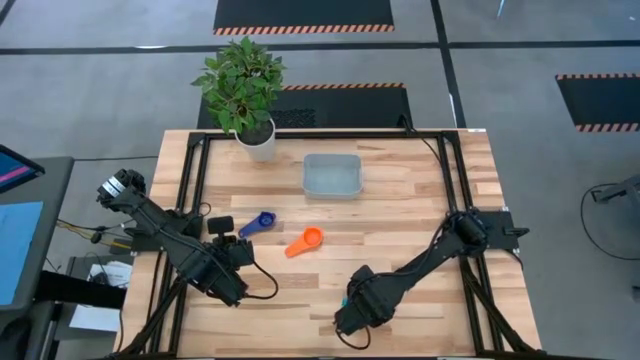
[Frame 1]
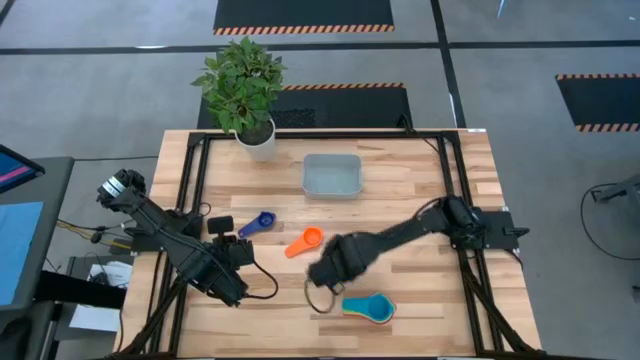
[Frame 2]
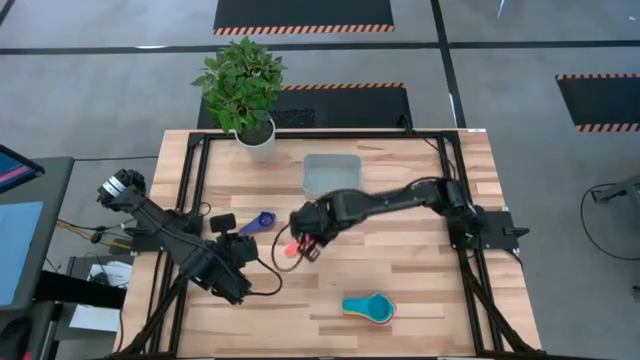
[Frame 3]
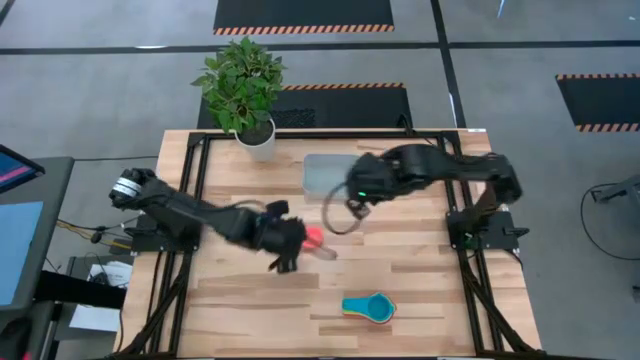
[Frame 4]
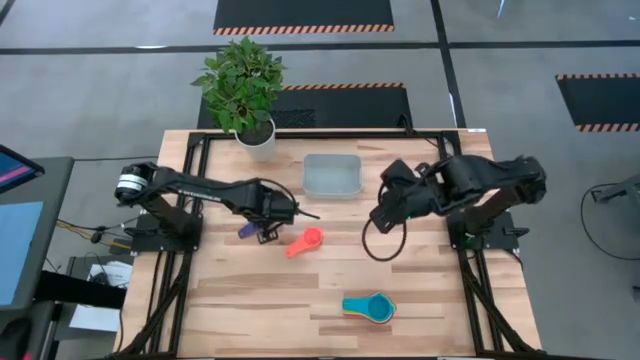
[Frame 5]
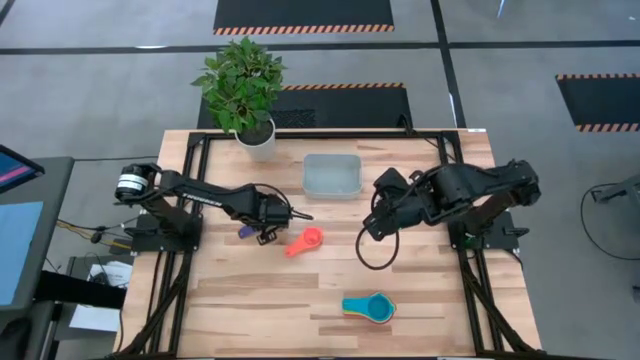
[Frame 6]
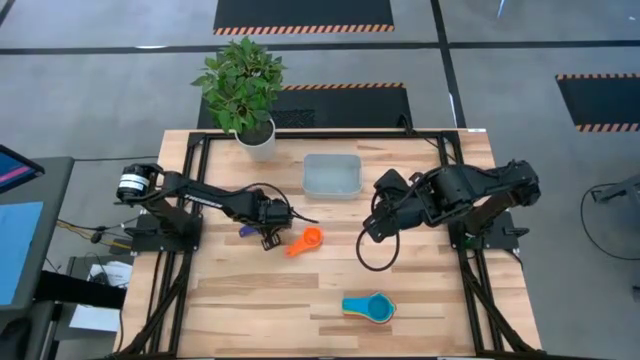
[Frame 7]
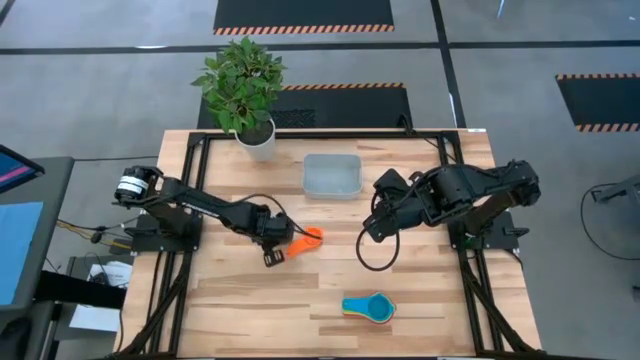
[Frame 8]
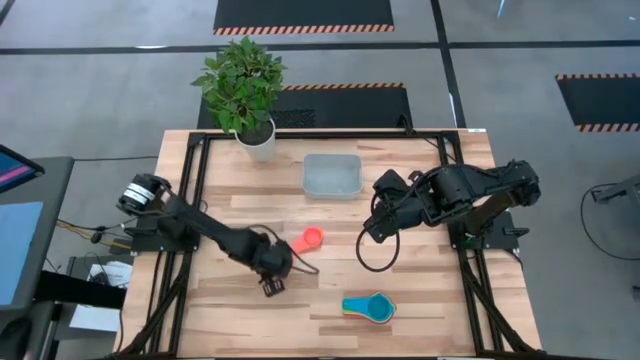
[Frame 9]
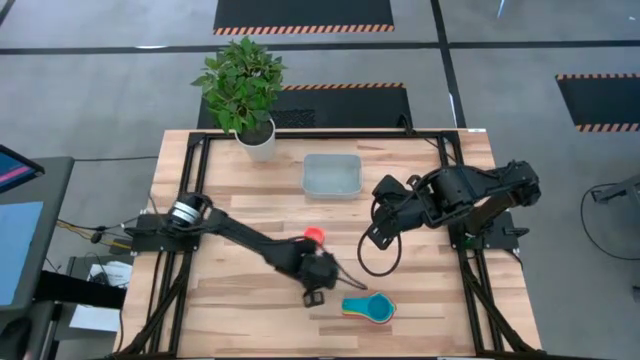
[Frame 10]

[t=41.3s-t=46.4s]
Task: Nest measuring cups in basket
Move the dark blue measuring cup to the center of the table

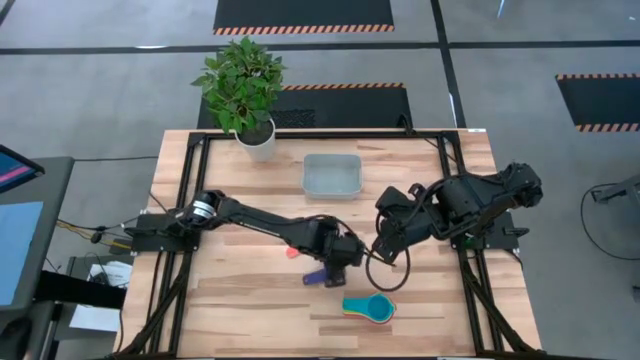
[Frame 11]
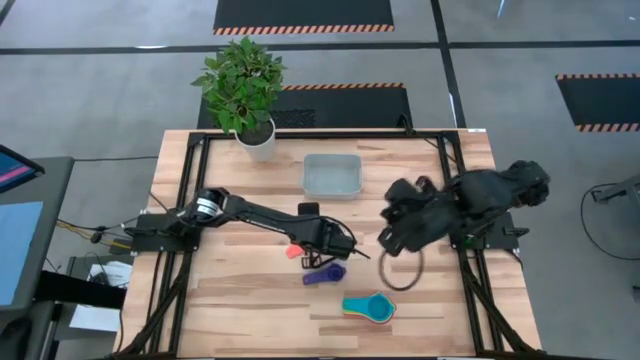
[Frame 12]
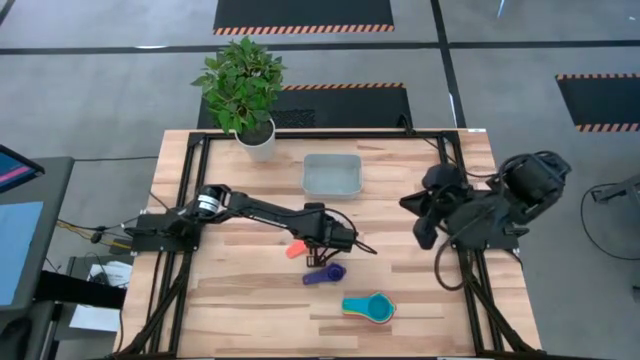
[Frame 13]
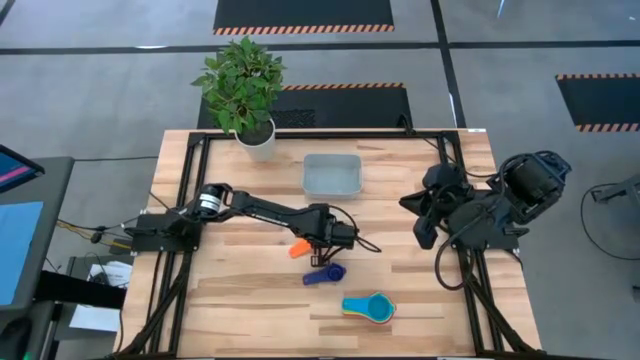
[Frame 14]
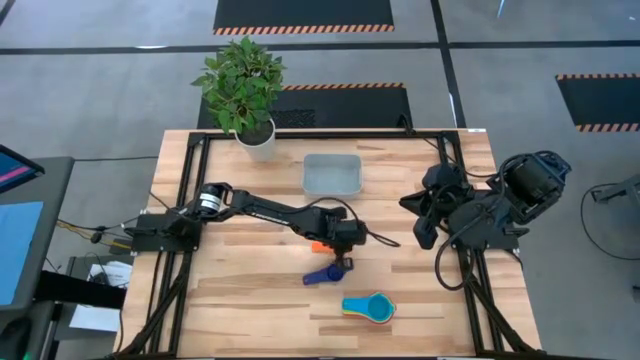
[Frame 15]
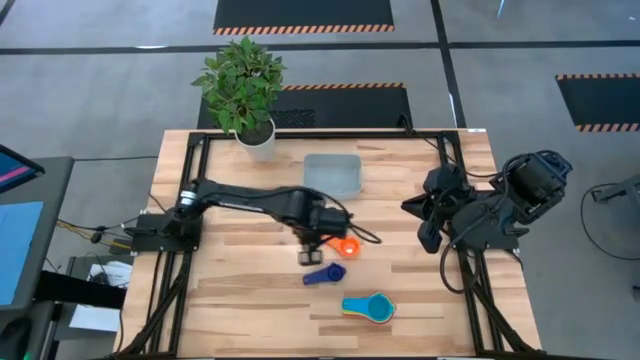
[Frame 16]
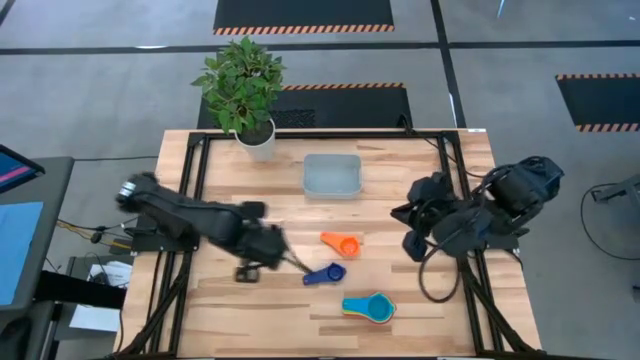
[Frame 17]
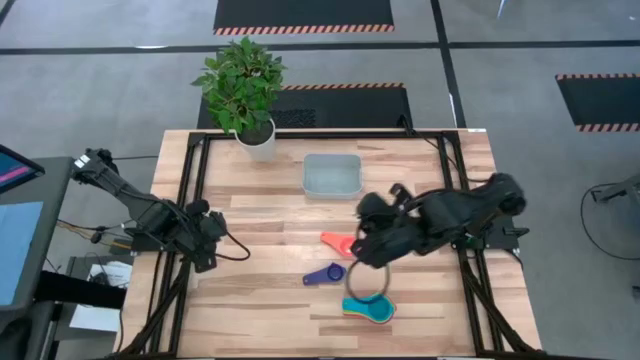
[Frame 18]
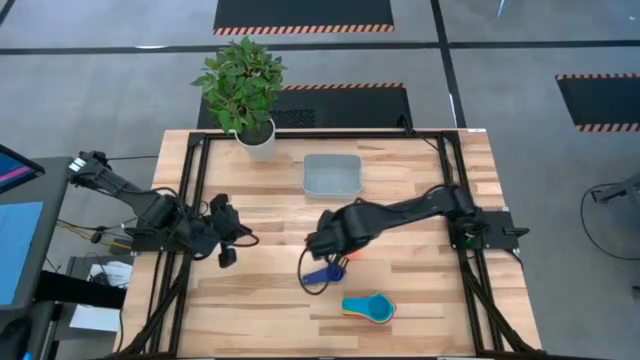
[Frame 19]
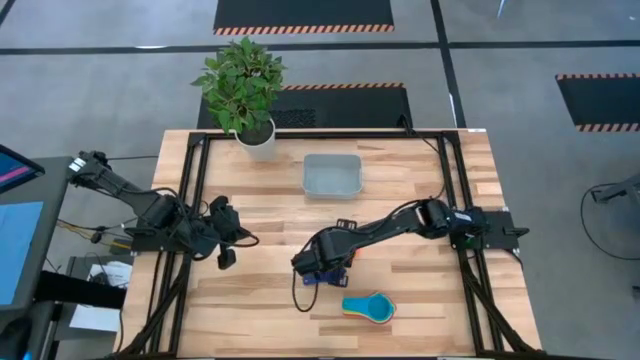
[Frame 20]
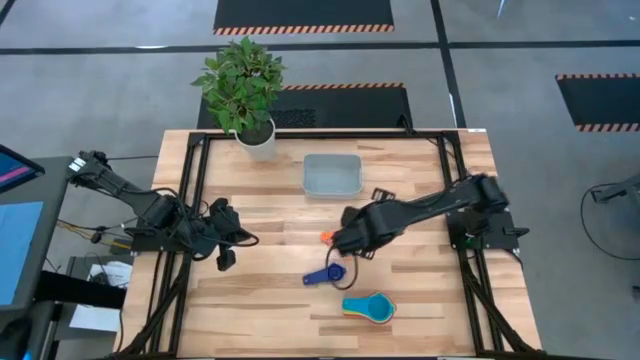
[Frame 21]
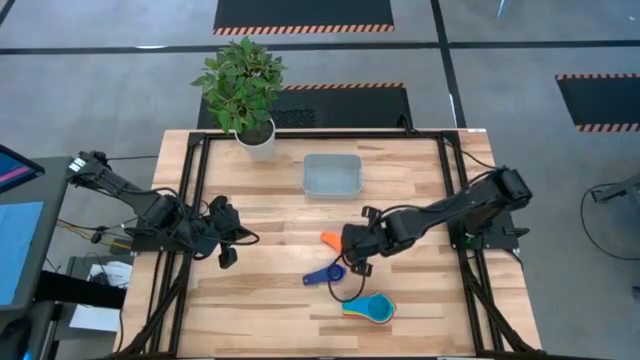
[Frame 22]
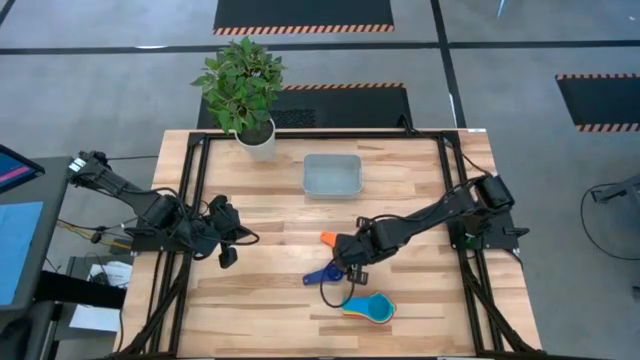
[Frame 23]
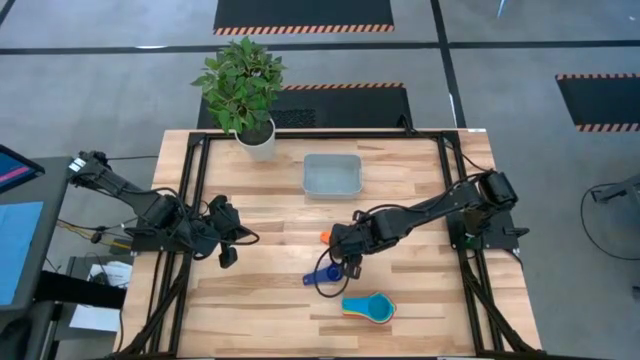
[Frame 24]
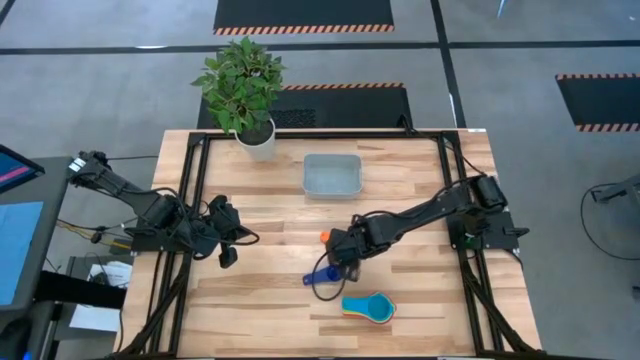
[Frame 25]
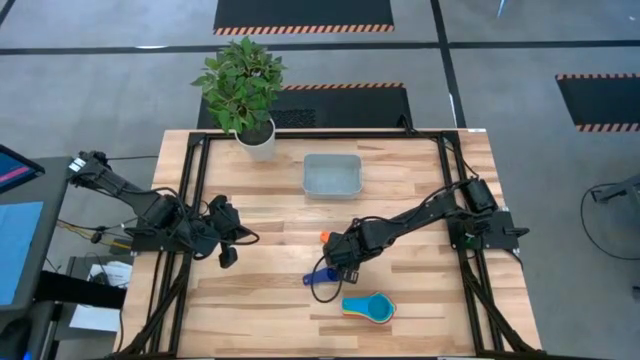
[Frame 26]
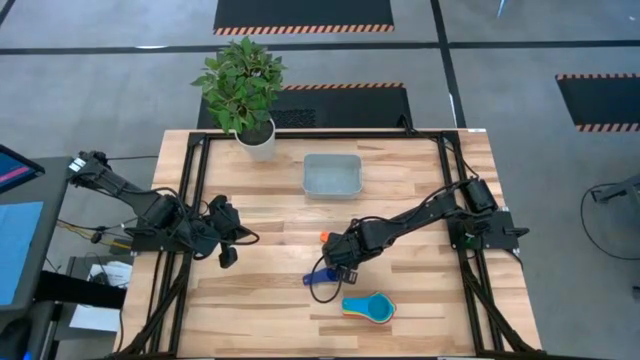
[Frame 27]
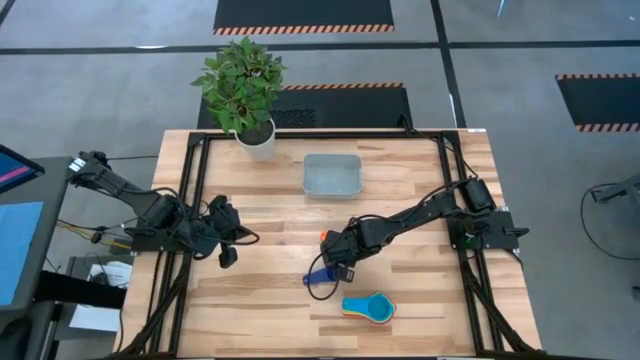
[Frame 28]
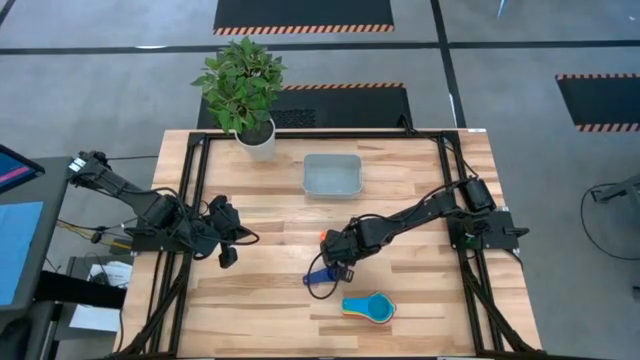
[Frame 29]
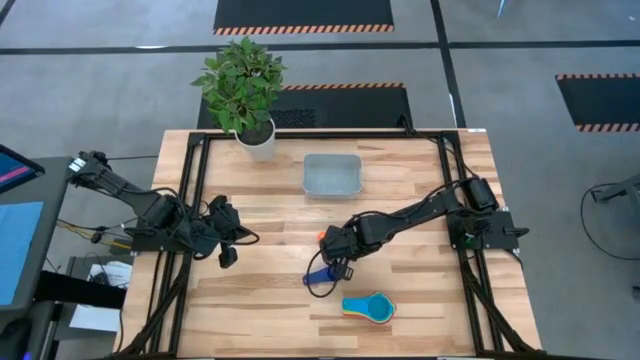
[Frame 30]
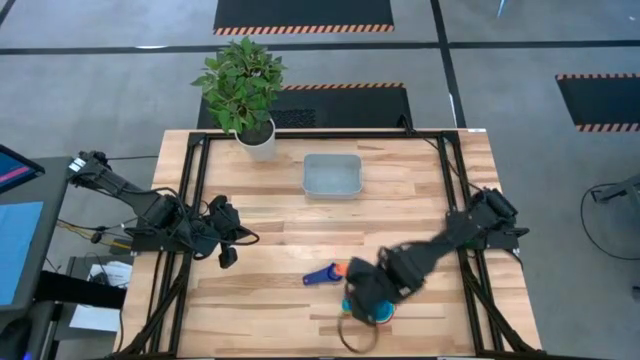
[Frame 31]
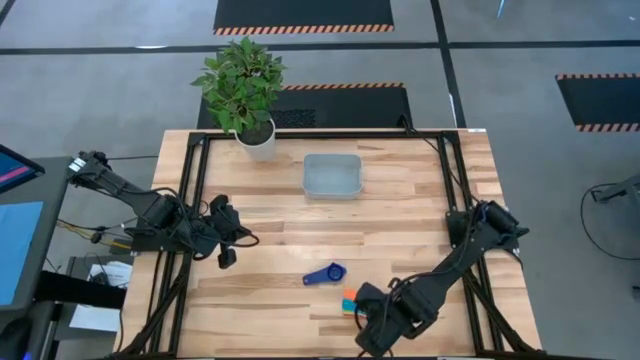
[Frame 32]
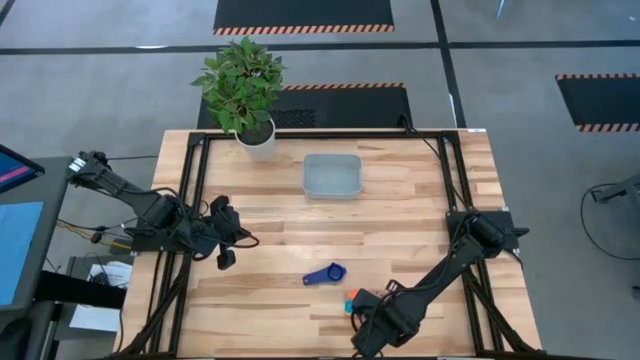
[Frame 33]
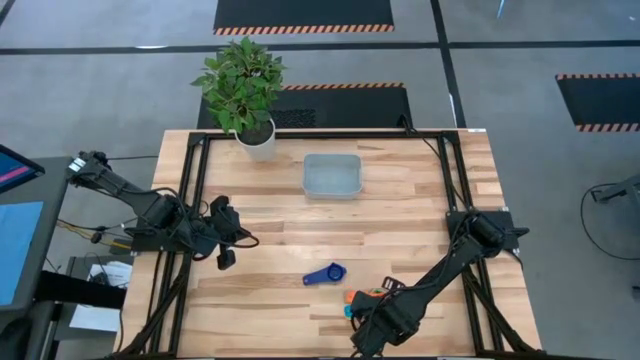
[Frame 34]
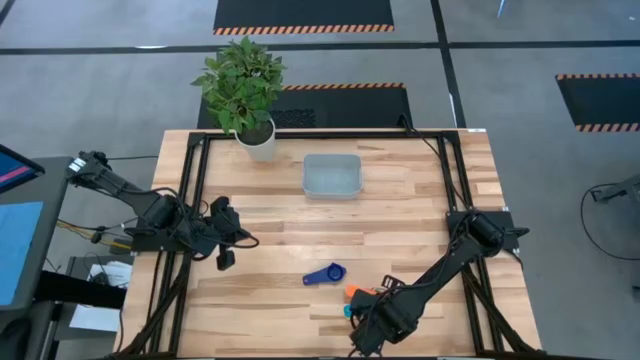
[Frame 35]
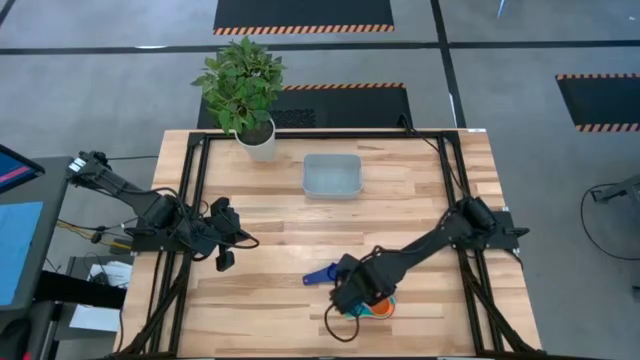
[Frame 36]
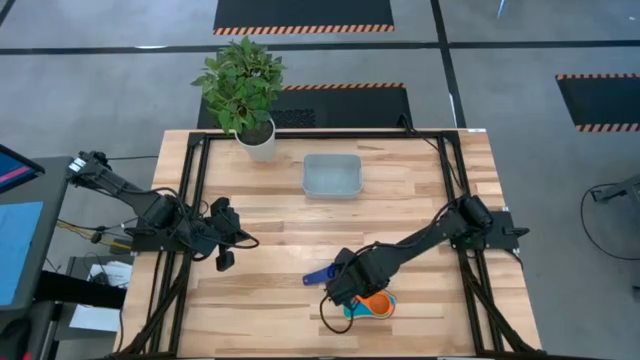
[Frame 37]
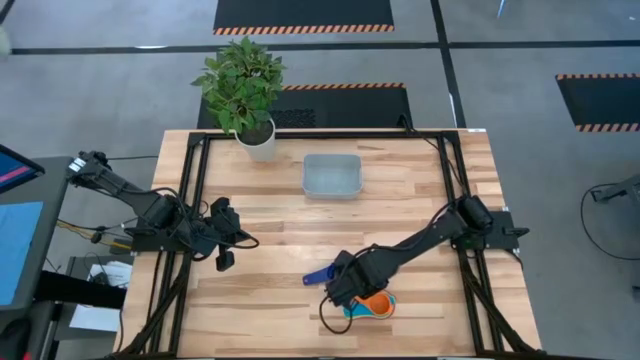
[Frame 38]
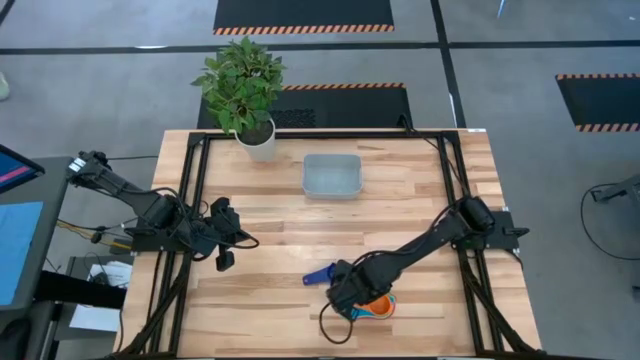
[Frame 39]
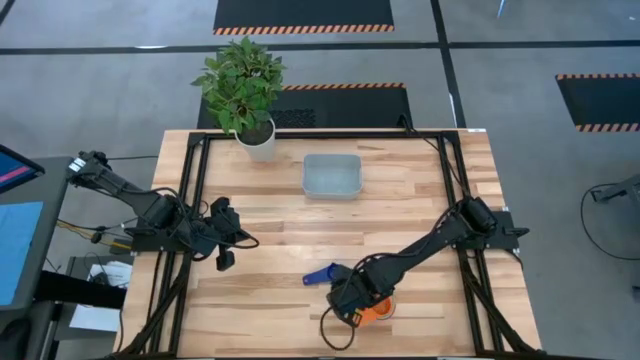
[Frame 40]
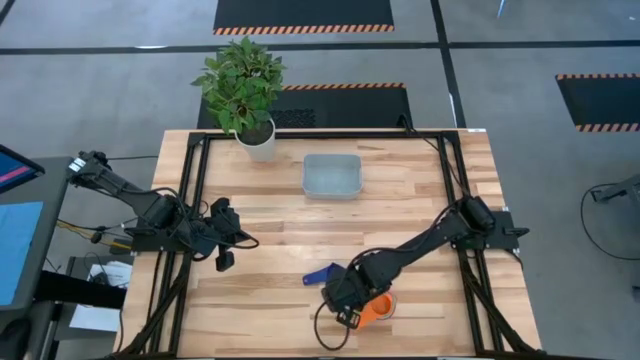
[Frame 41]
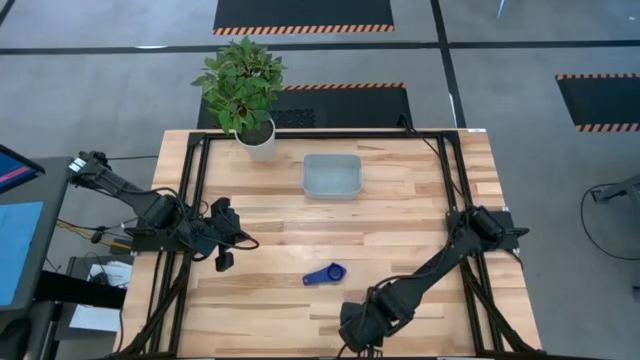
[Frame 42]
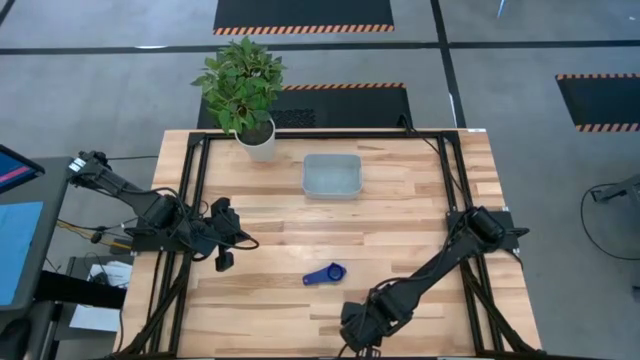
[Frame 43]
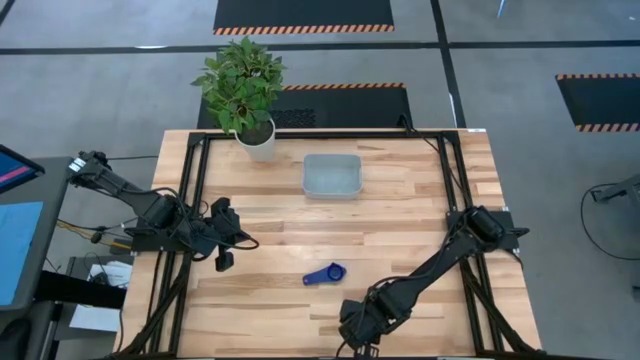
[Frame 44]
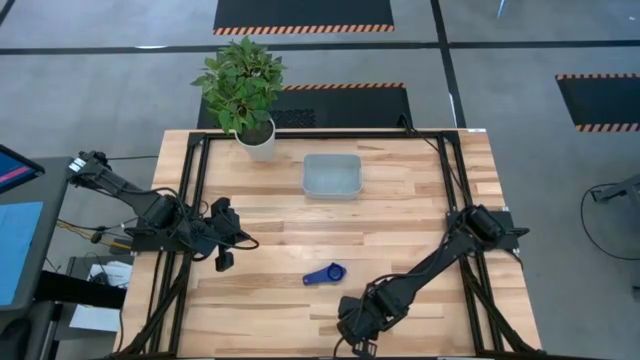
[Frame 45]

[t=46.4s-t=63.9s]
Stack the orange measuring cup on top of the light blue measuring cup
